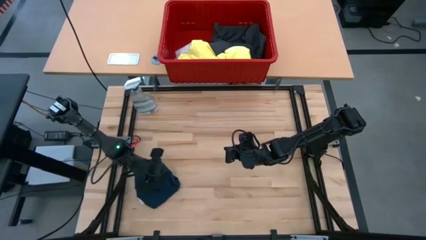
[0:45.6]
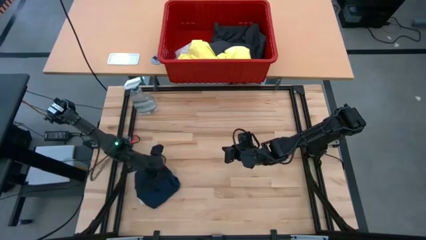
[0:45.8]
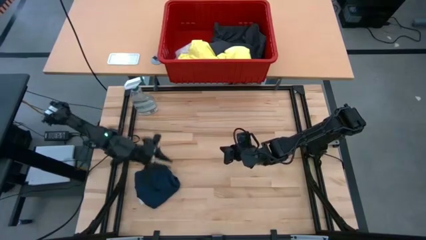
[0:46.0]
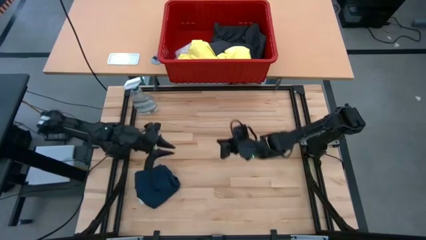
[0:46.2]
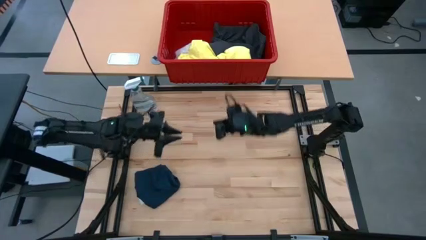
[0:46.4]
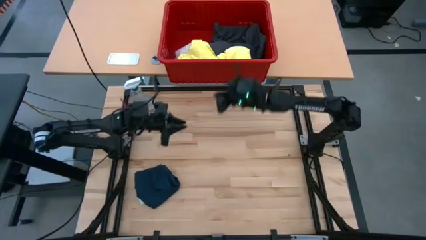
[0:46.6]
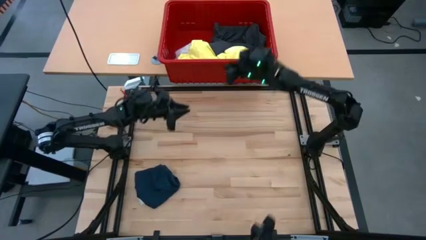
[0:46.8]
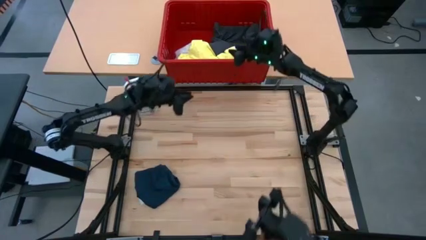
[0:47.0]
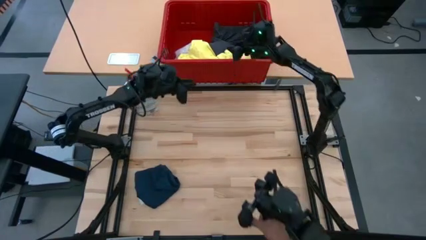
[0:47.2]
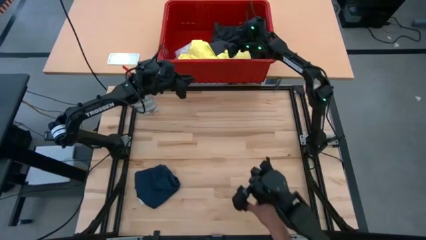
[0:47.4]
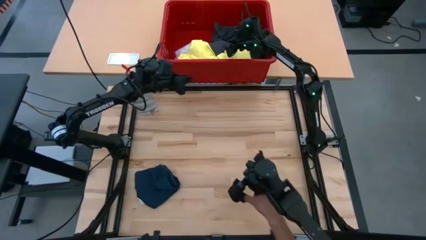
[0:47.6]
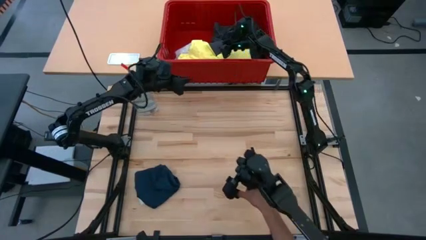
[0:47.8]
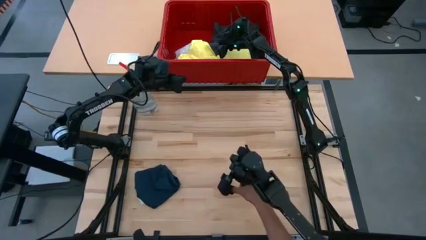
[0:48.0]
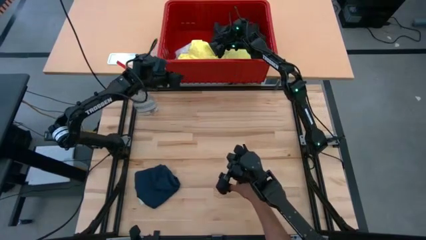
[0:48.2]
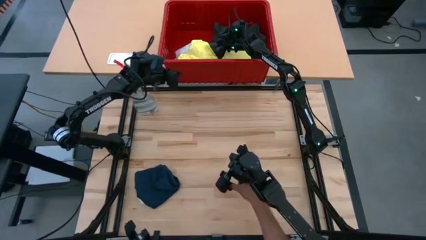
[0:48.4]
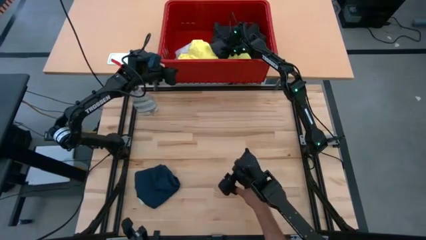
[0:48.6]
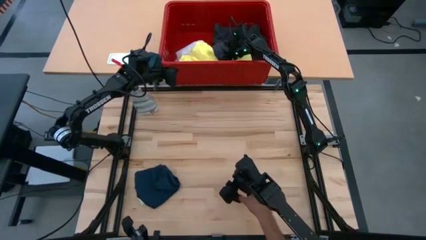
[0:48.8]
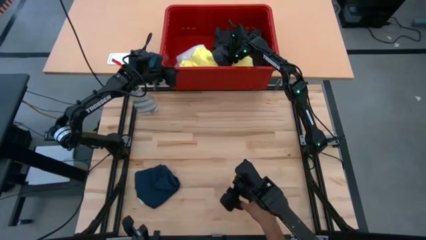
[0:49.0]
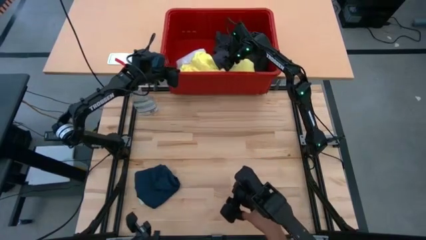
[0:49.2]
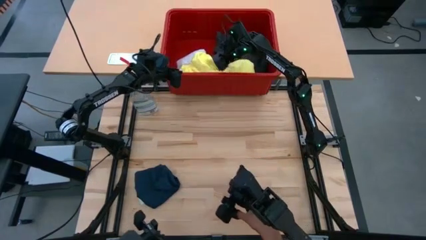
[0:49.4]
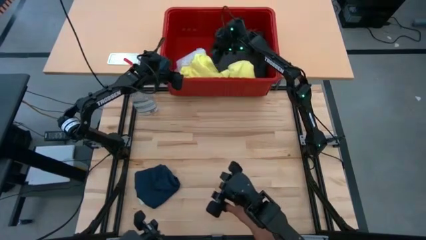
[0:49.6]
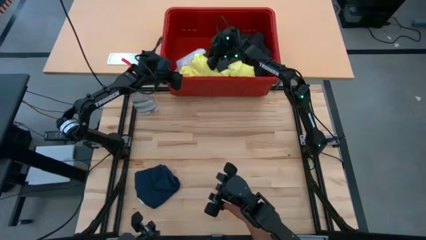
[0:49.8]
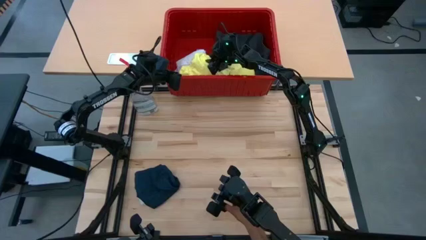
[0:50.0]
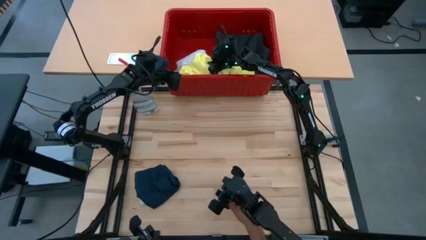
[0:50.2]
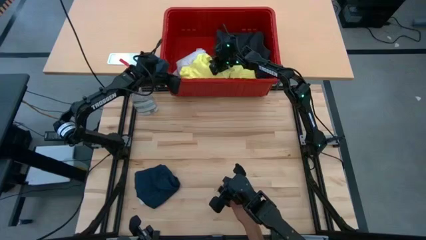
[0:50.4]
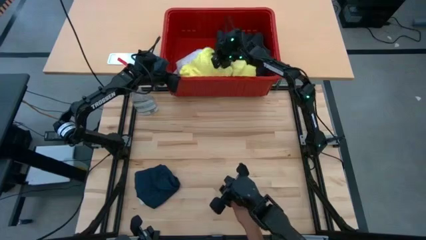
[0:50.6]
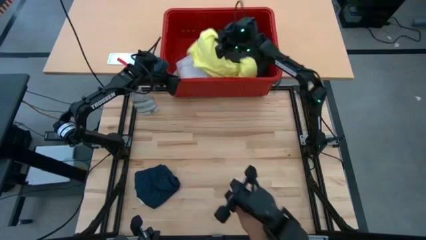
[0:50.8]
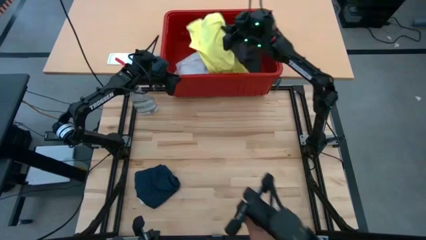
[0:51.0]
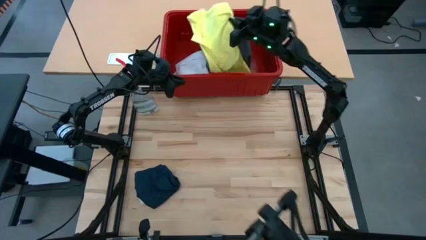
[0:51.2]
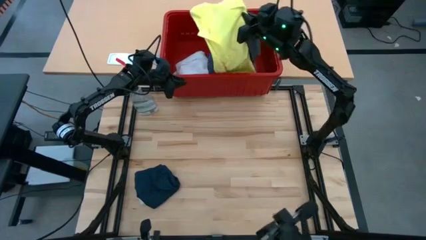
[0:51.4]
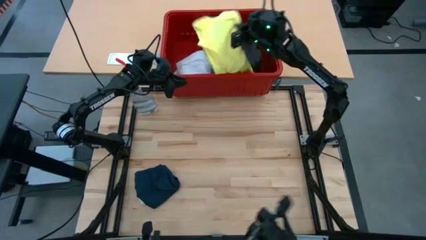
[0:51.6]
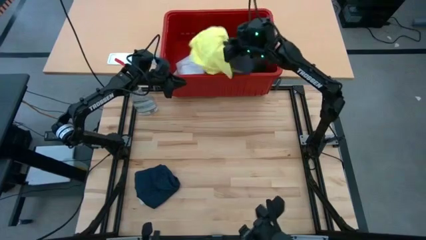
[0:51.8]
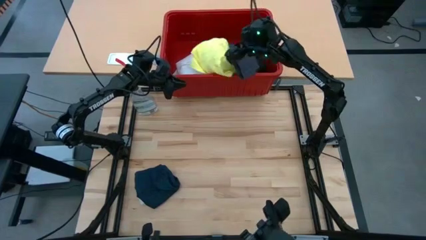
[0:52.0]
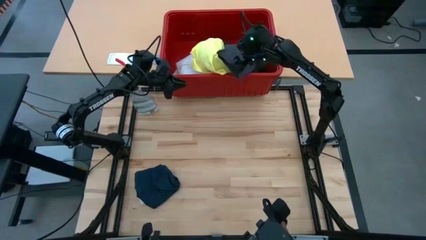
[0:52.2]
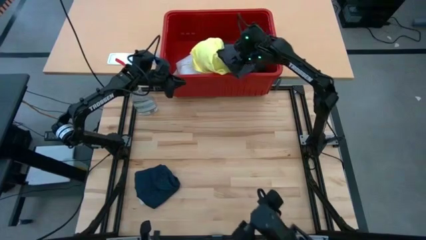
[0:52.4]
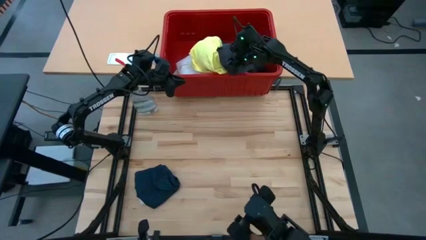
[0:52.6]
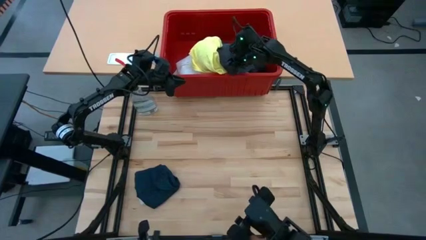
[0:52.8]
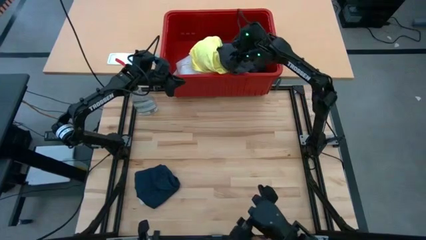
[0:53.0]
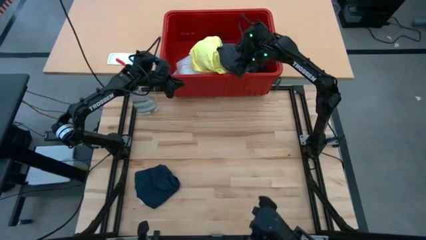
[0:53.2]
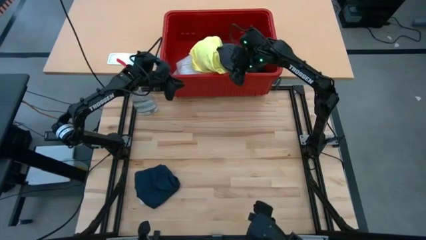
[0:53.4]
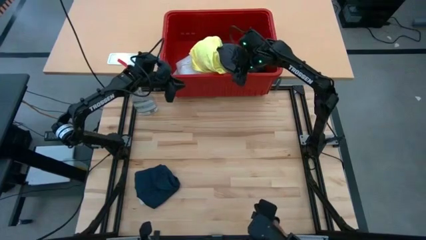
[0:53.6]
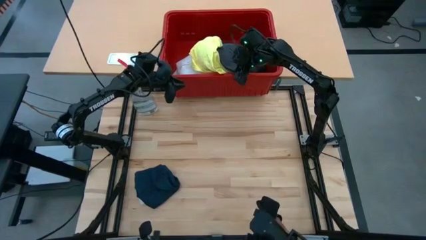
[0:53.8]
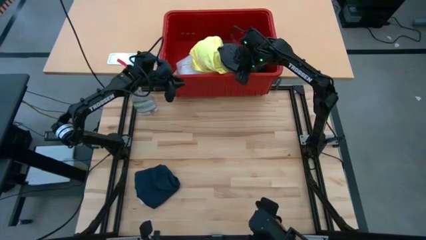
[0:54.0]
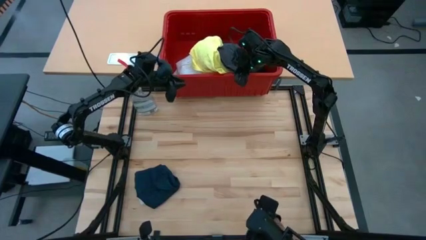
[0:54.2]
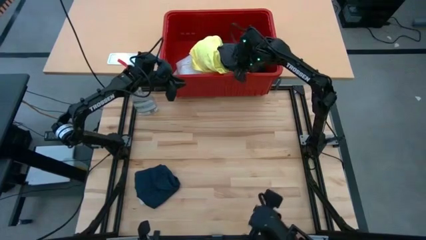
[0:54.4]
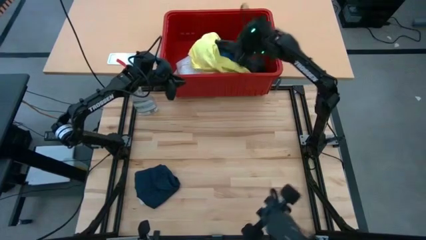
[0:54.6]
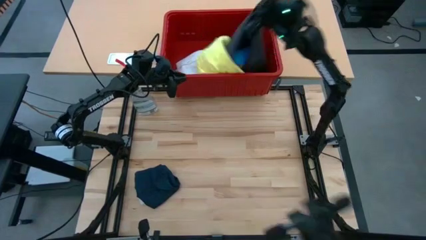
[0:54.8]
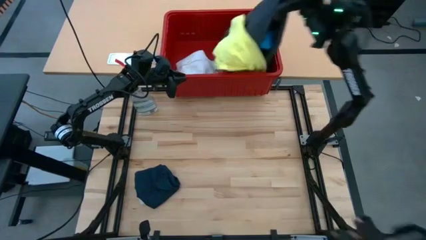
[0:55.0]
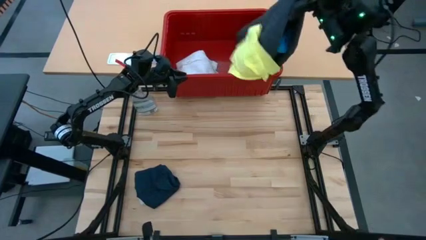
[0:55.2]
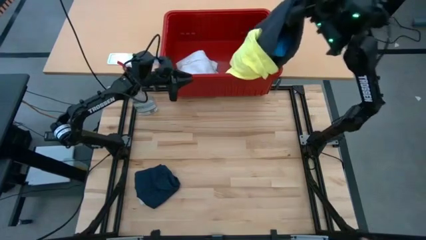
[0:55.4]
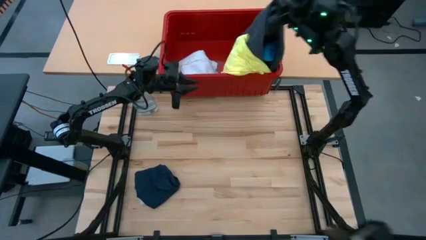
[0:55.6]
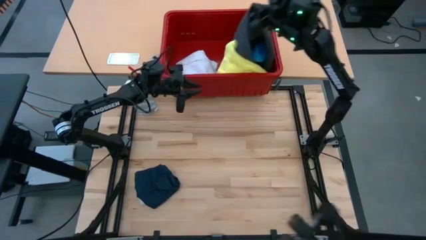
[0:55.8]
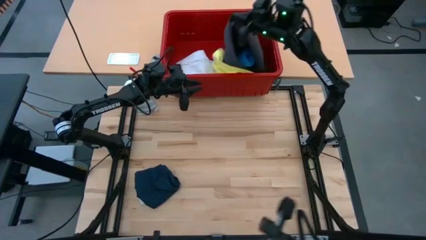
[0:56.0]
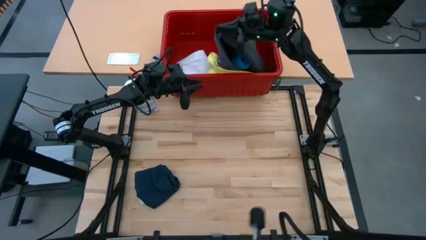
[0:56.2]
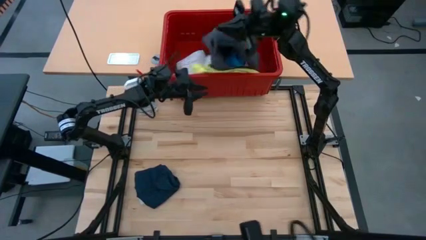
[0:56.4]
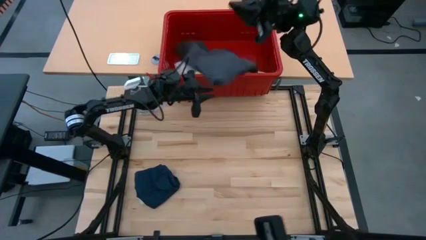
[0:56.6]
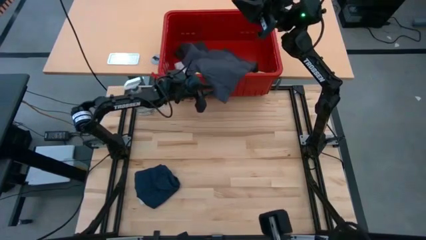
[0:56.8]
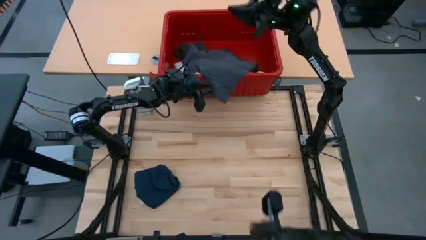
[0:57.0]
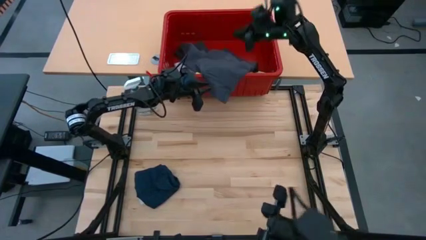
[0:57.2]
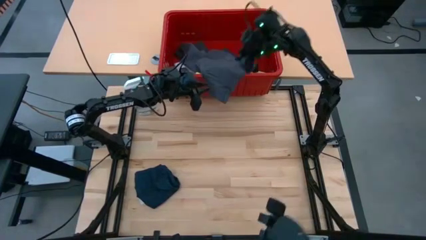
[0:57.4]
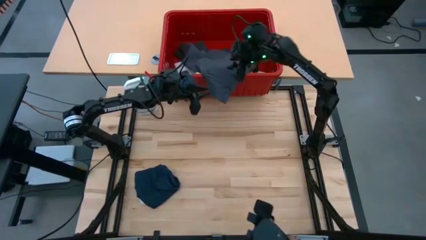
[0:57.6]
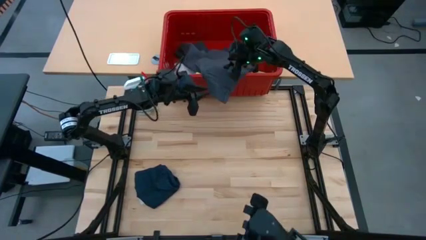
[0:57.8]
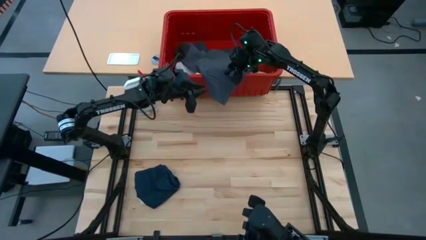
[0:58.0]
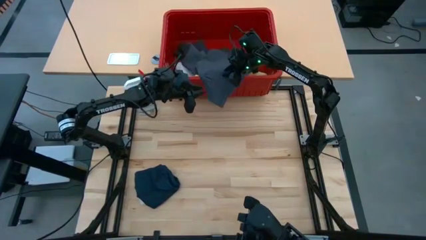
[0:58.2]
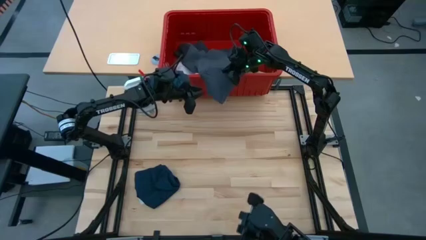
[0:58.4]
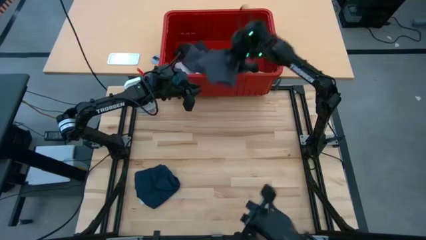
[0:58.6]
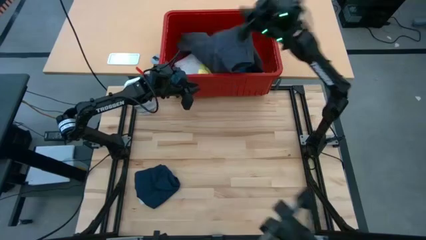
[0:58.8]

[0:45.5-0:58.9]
Task: Fold laundry
Remove the black shorts from the red laundry bin

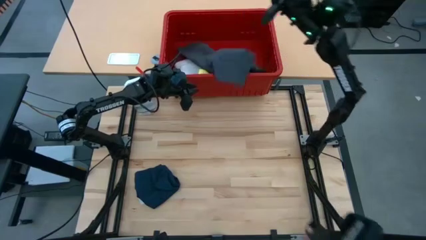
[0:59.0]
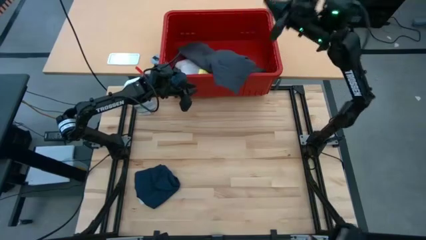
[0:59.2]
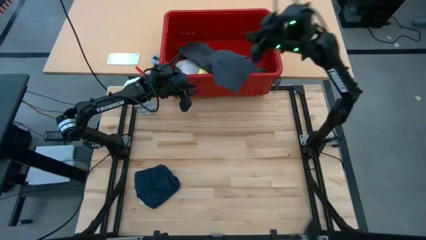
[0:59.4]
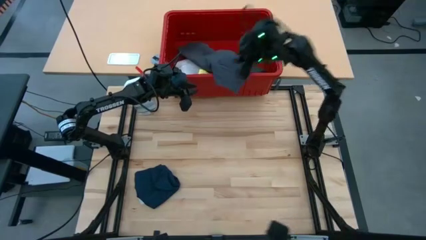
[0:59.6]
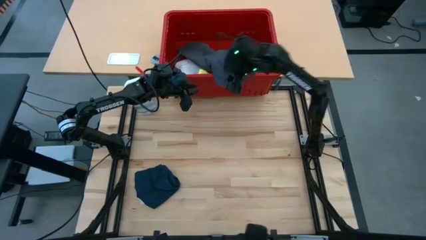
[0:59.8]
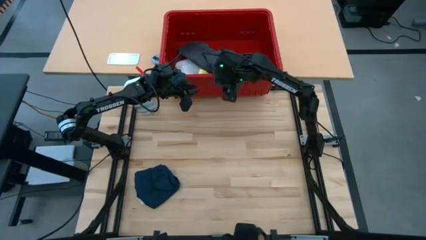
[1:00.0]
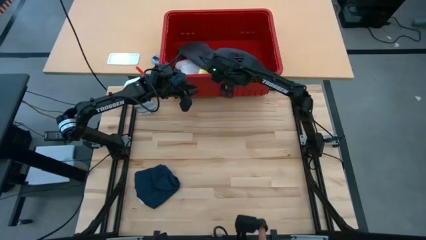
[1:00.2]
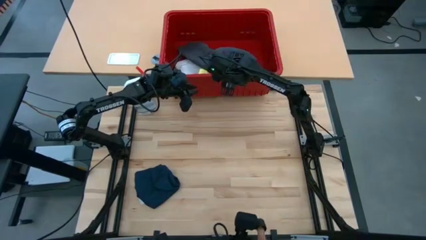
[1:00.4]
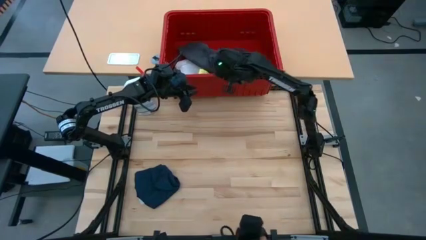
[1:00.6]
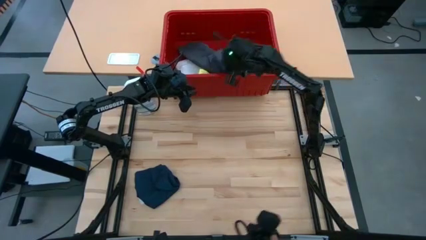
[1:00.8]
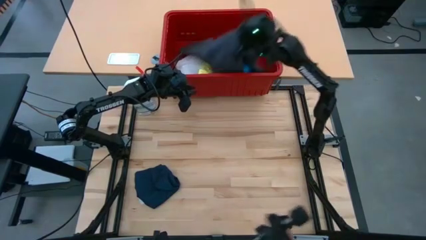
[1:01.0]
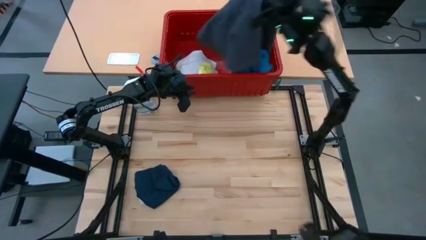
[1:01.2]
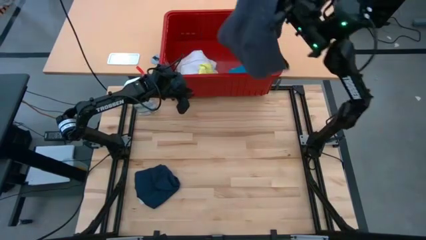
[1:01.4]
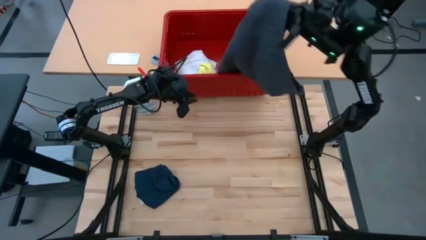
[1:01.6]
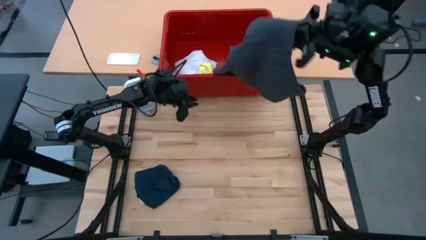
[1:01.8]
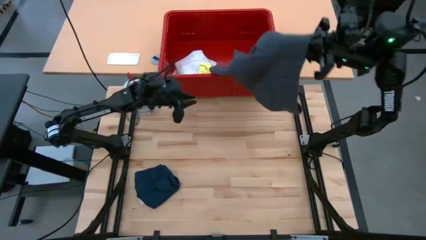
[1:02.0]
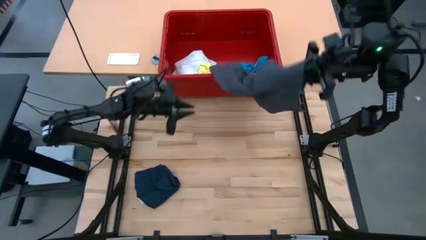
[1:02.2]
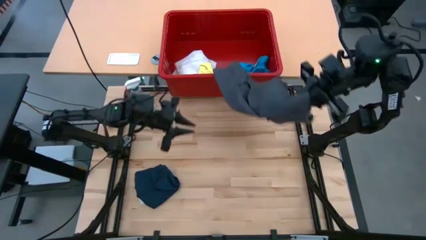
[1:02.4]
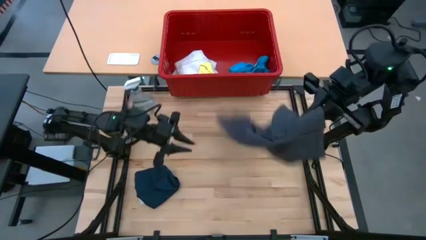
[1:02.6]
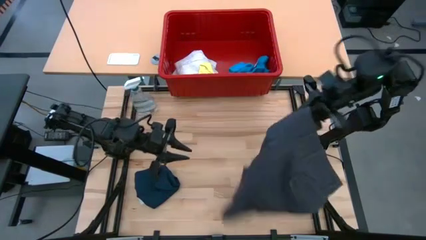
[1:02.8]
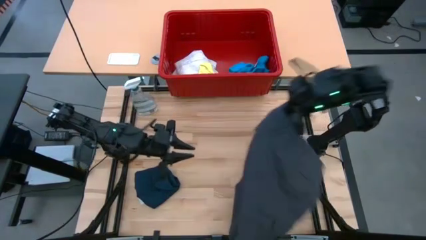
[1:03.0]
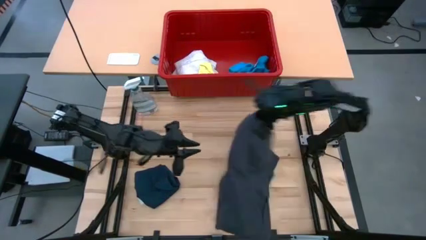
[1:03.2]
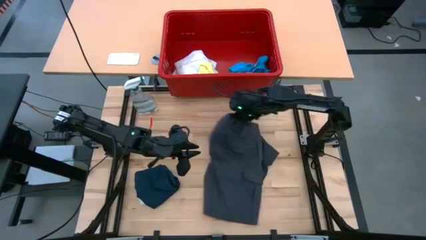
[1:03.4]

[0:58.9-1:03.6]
Remove the black shorts from the red laundry bin
